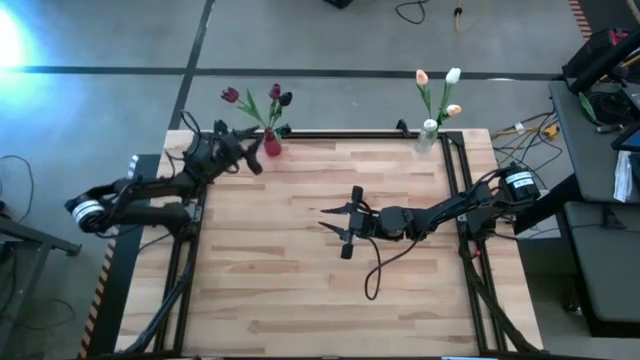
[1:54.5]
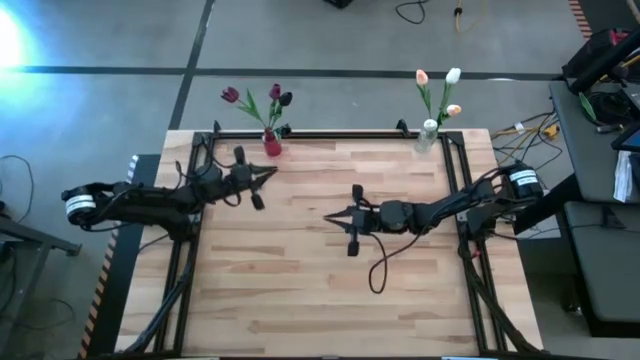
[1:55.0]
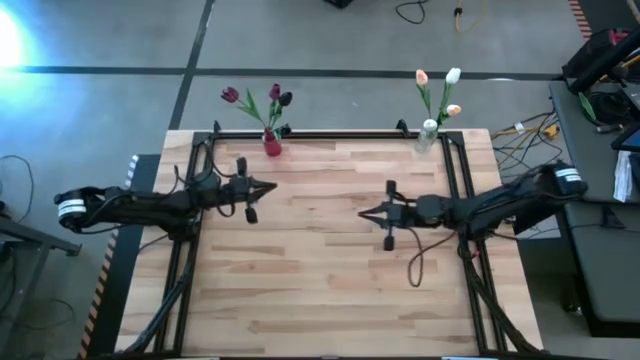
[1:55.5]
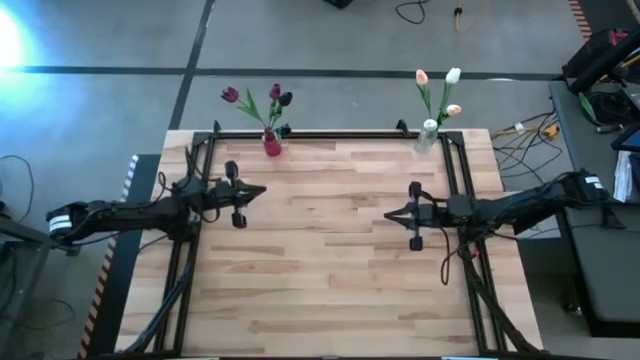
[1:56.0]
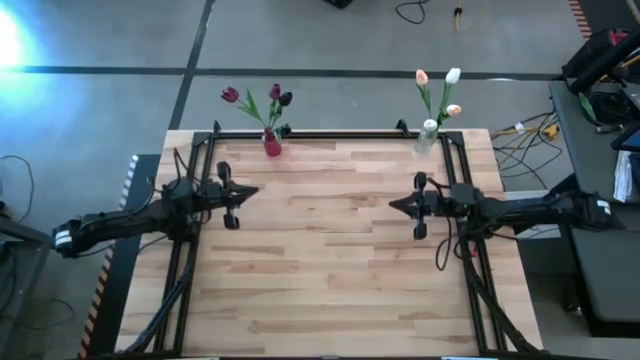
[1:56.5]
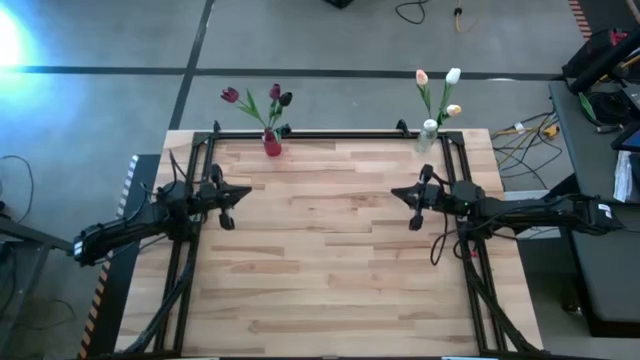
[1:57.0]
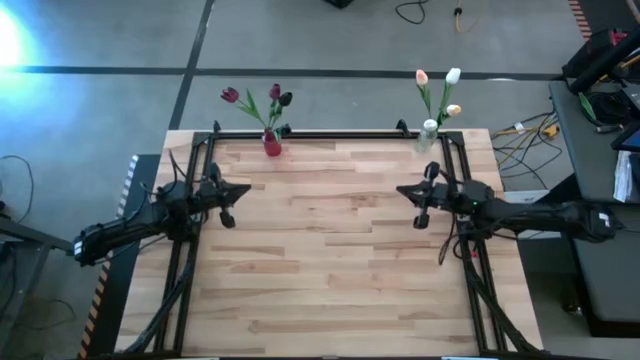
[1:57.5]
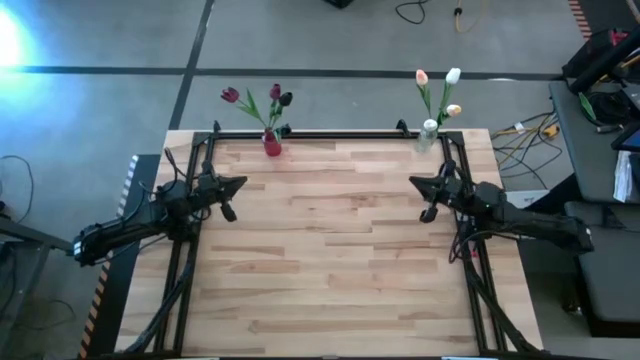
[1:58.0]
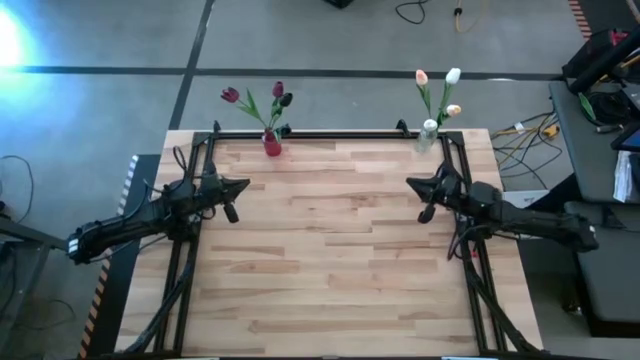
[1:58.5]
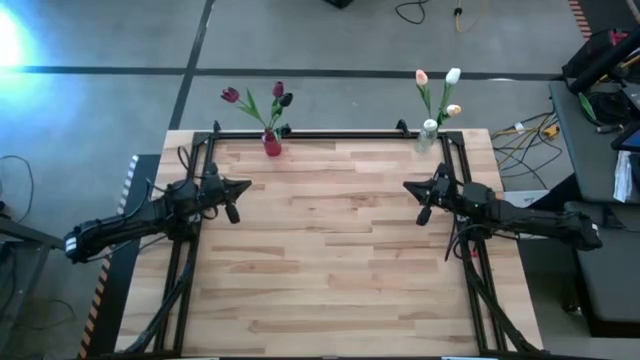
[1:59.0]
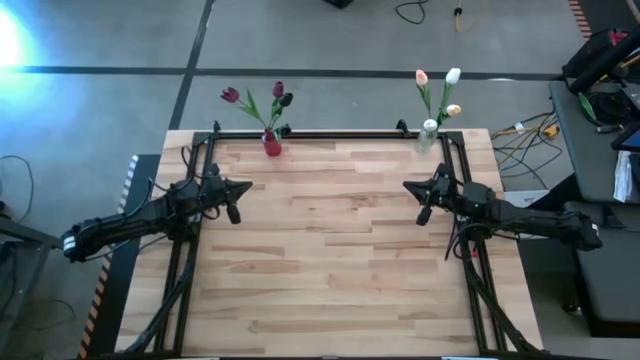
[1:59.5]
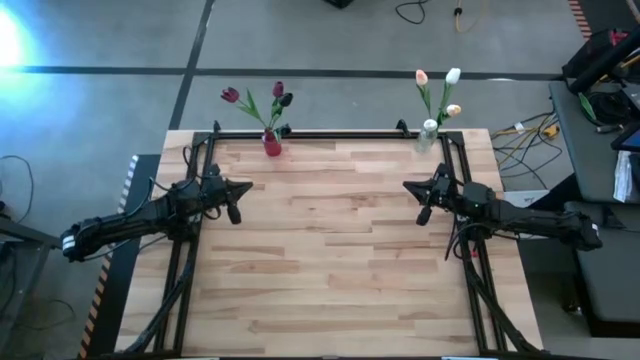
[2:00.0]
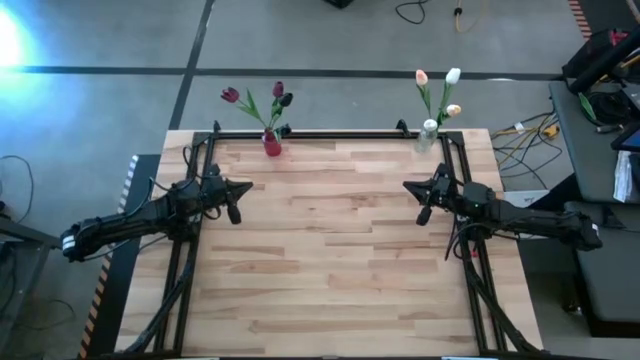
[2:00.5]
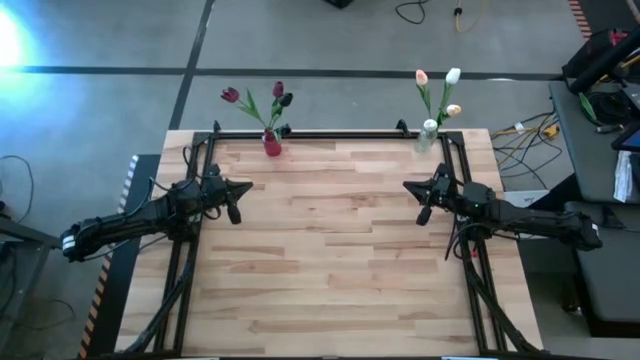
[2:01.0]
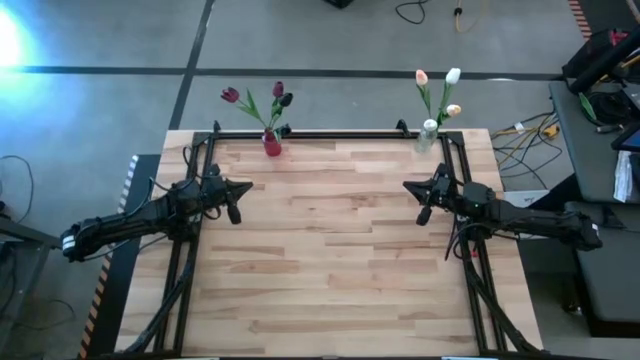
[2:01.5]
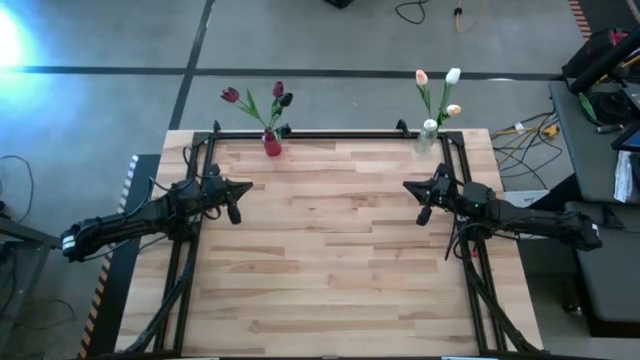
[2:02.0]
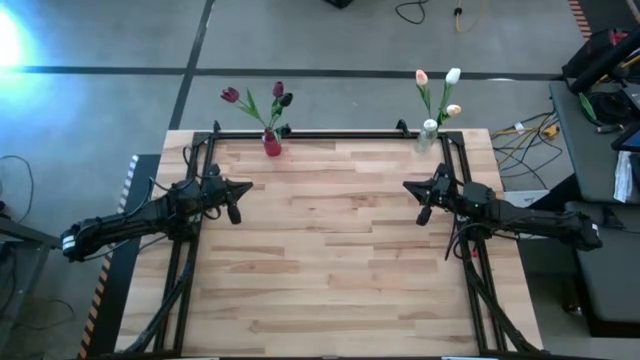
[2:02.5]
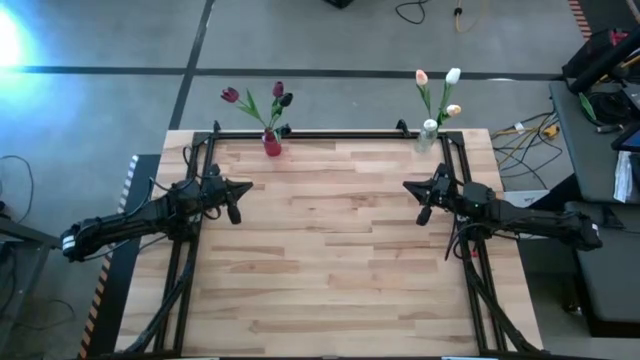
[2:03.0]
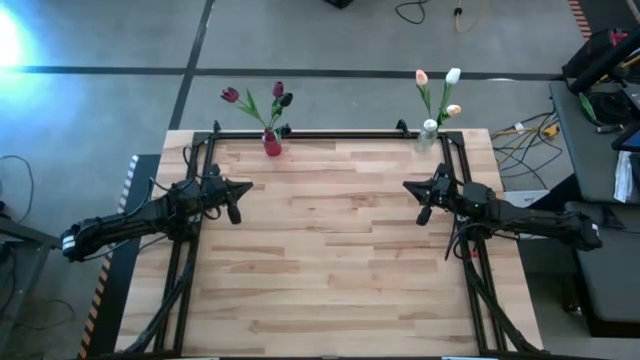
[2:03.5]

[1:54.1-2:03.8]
Task: Sort flowers into vase by color
Return to Home Position

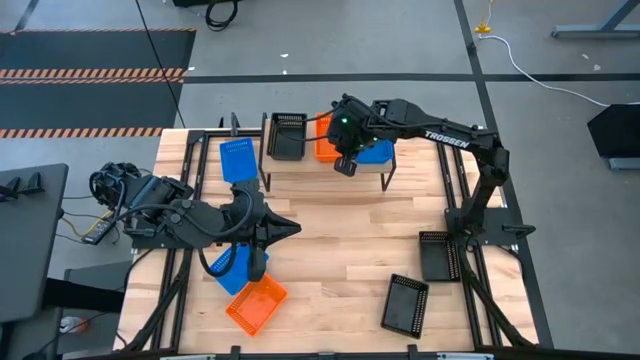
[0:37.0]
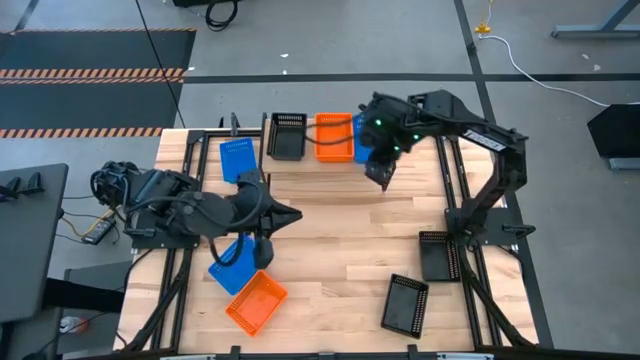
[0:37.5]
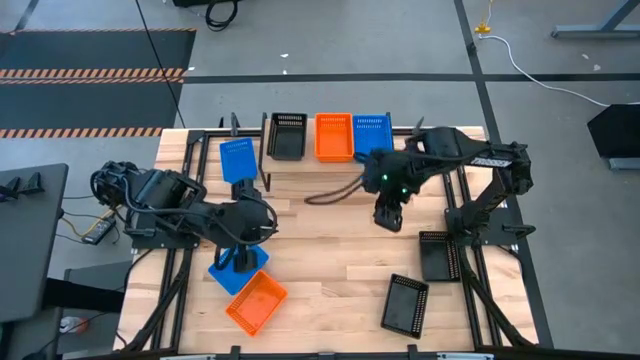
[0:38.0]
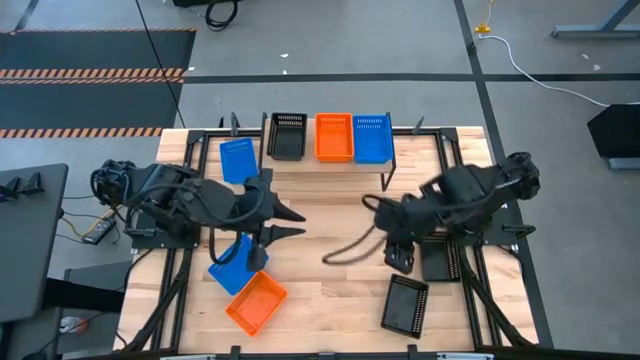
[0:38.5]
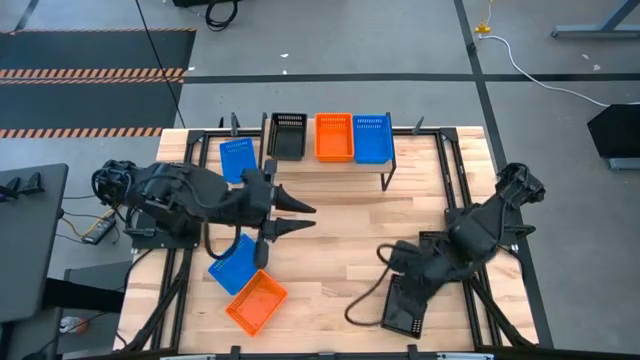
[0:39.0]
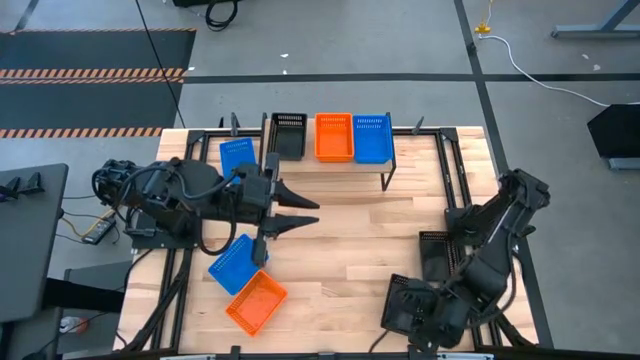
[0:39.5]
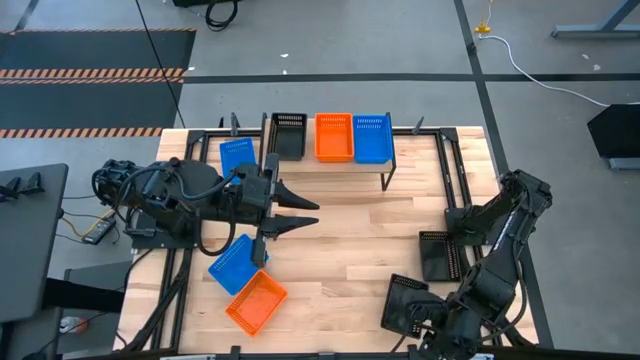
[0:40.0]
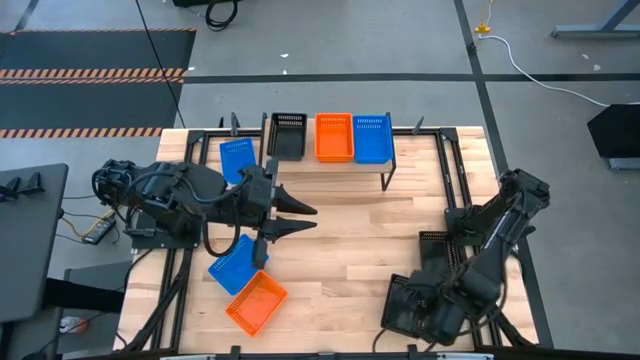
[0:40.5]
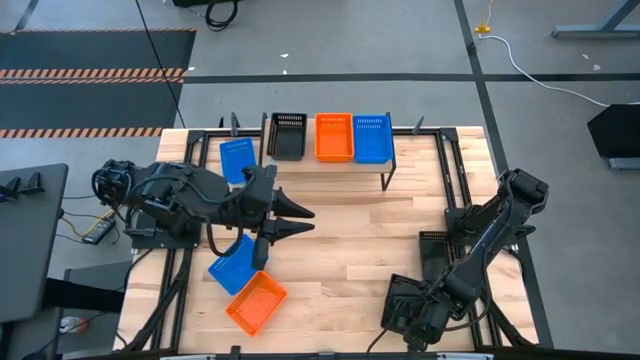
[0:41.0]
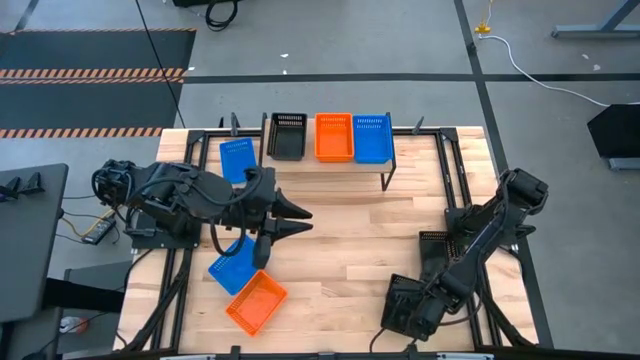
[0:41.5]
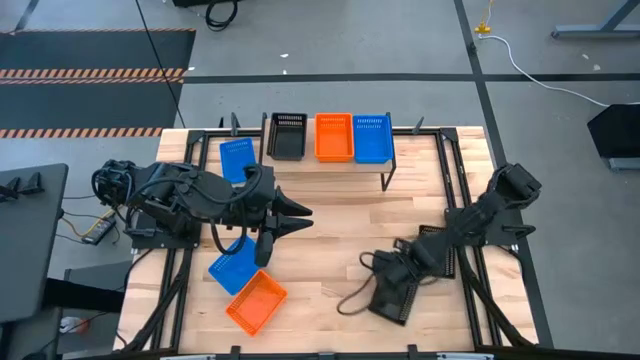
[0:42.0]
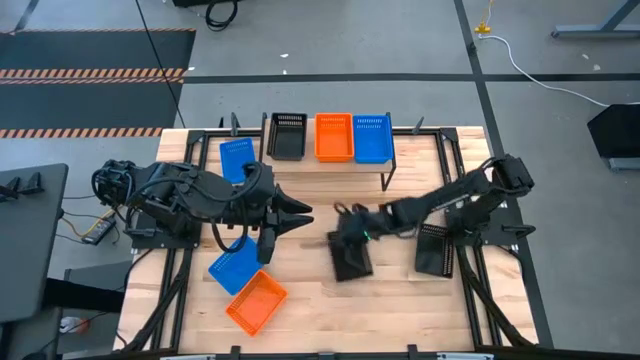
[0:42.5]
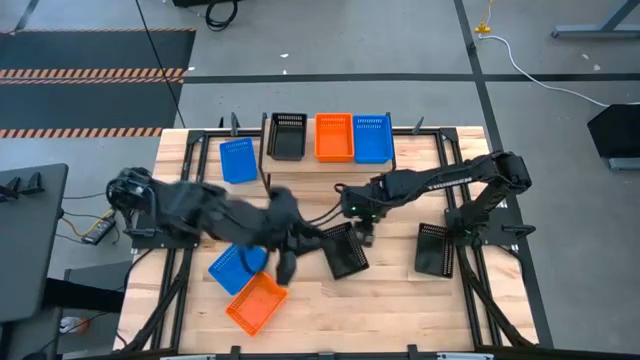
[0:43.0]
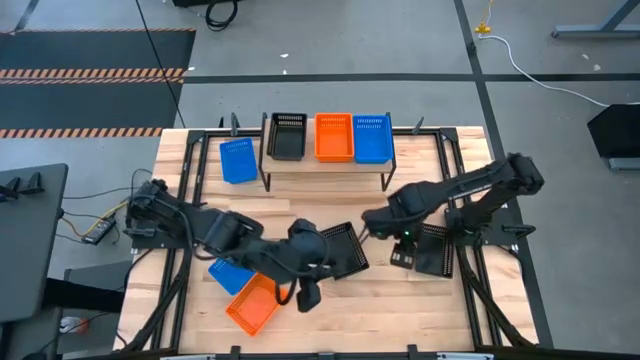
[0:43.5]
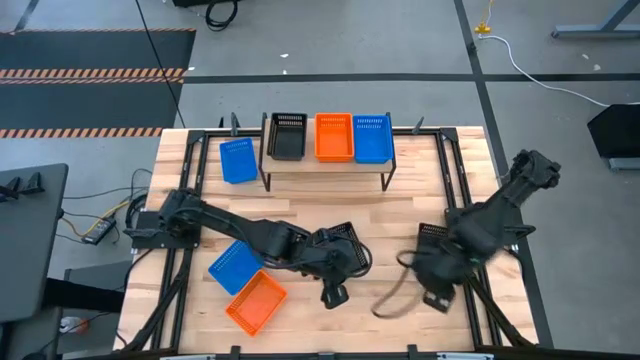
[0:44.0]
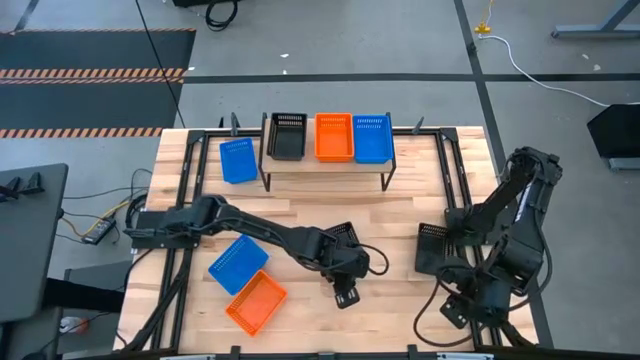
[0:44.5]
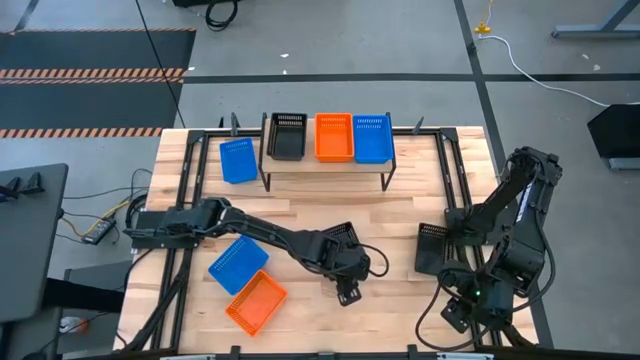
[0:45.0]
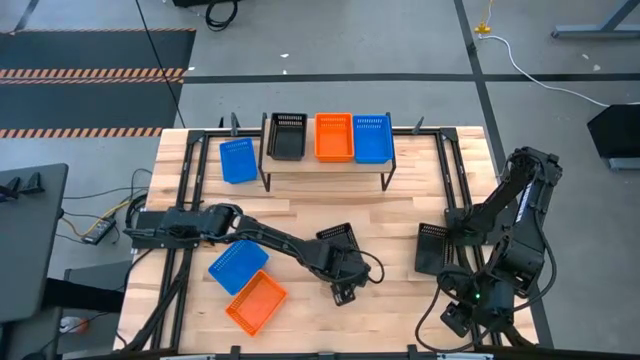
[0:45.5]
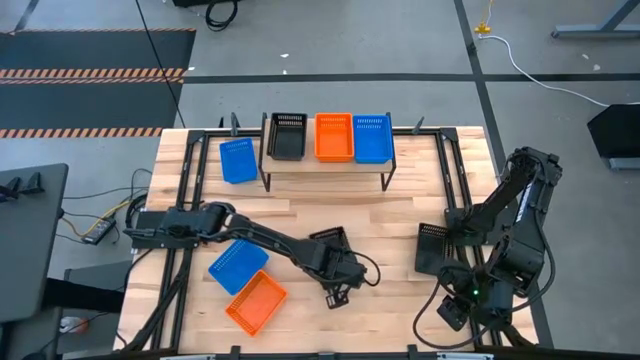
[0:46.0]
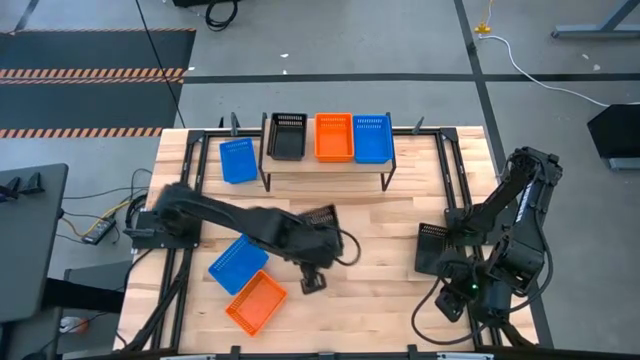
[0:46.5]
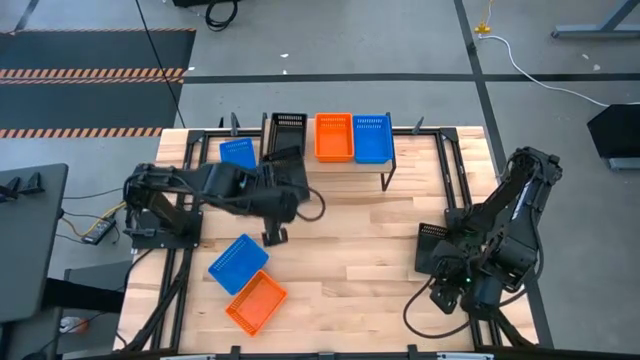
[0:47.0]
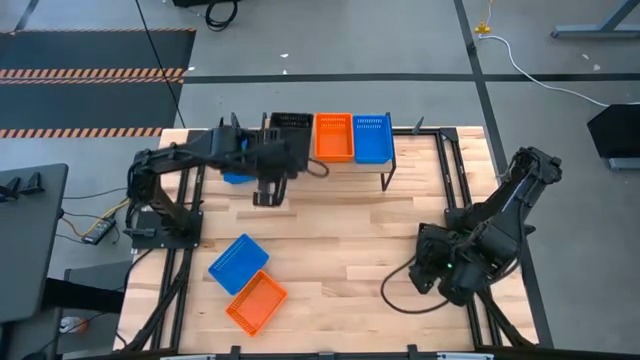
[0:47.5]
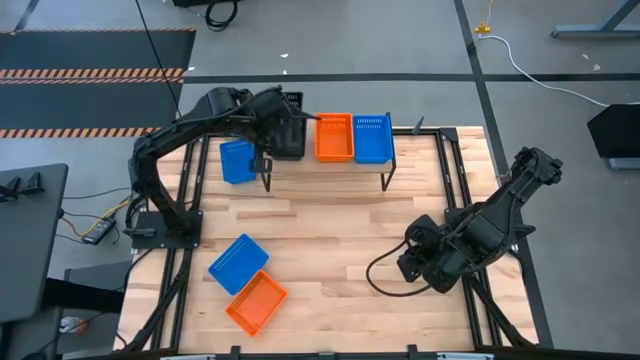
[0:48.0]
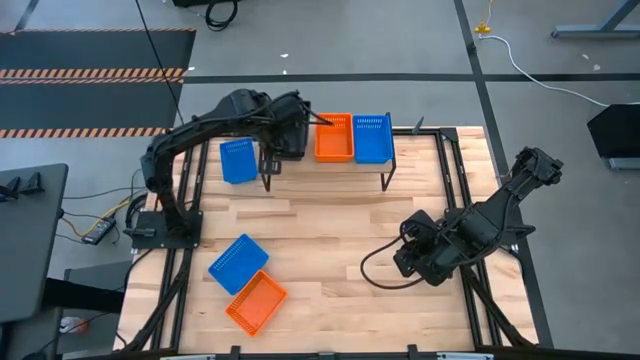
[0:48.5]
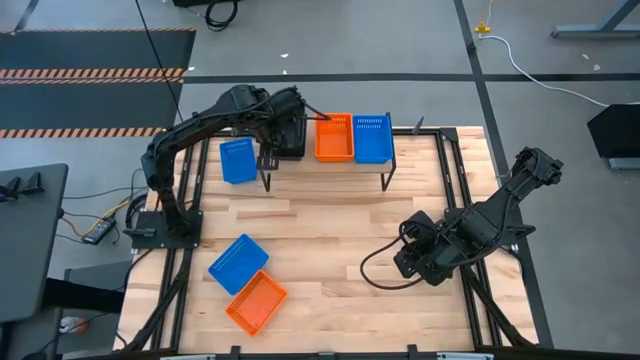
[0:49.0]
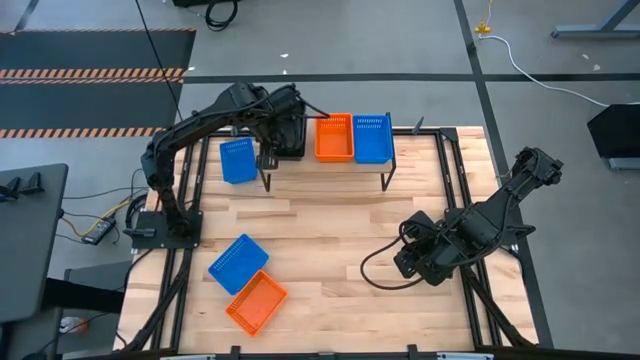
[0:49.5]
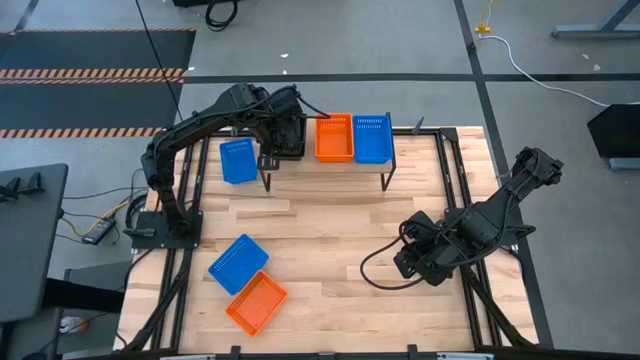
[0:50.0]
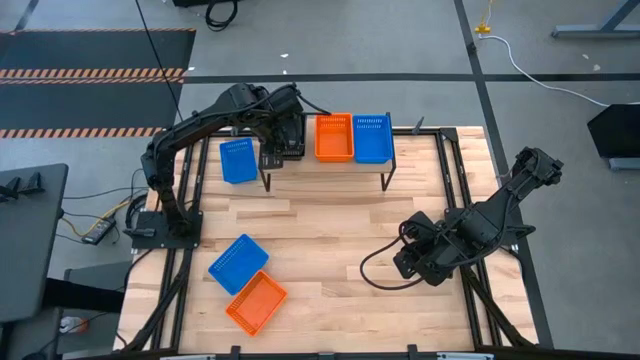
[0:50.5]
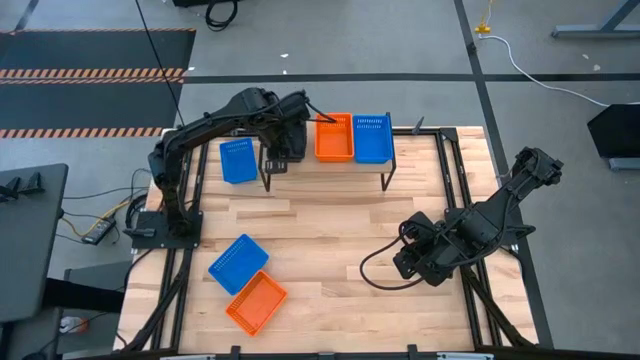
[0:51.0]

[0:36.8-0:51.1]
Task: Stack baskets on shelf by color
Stack the bottom black bin on top of the black bin on the shelf
